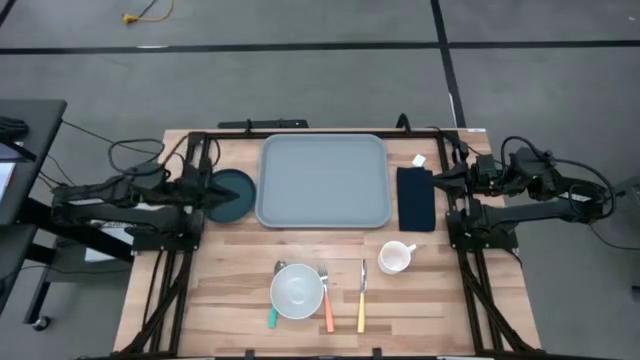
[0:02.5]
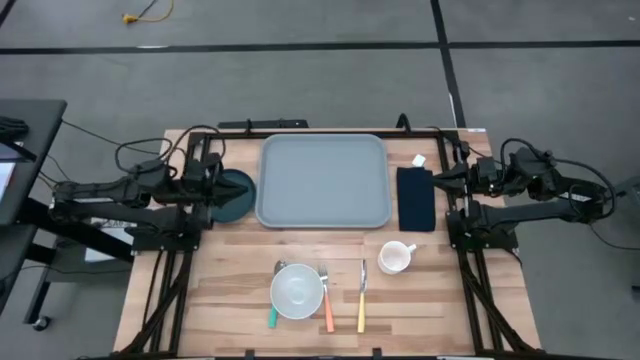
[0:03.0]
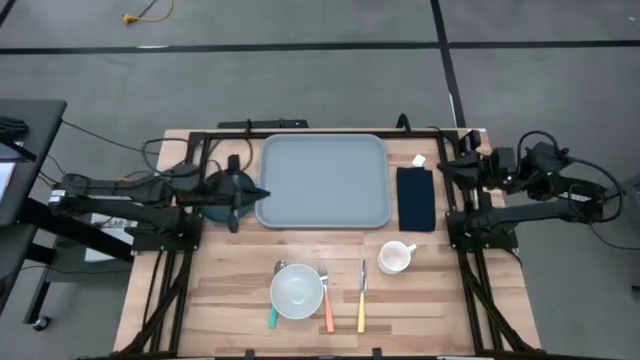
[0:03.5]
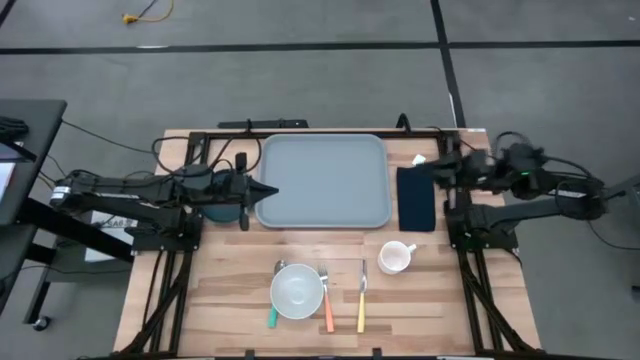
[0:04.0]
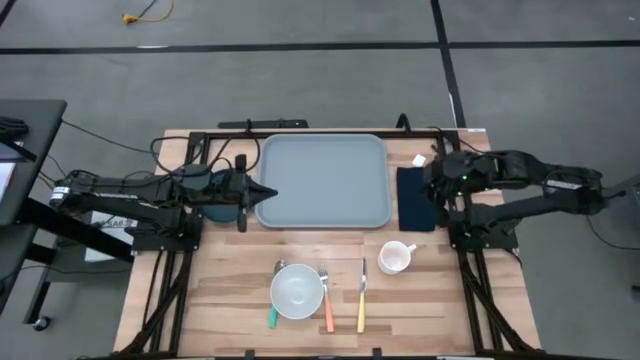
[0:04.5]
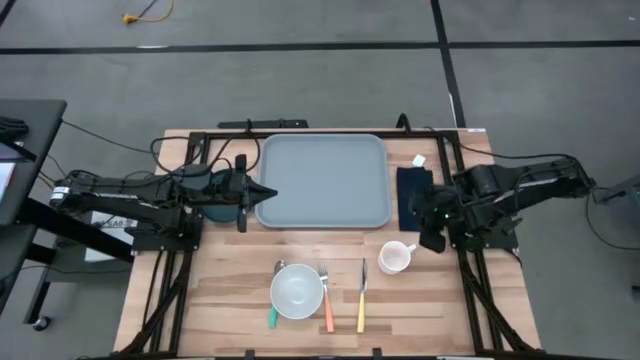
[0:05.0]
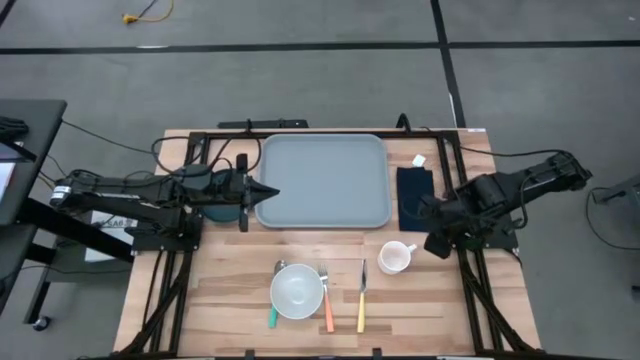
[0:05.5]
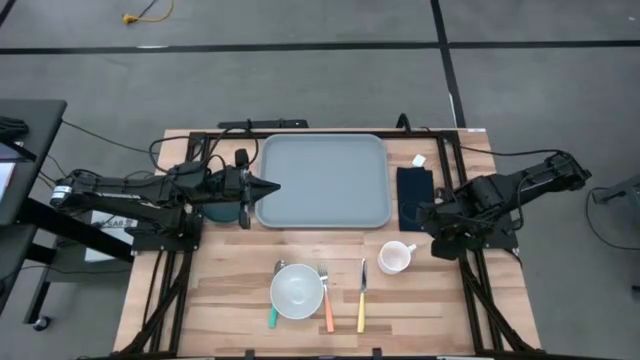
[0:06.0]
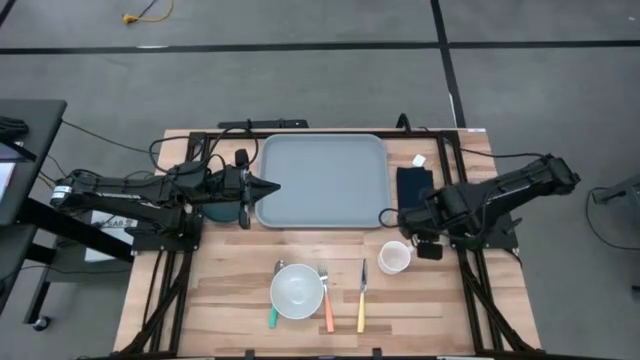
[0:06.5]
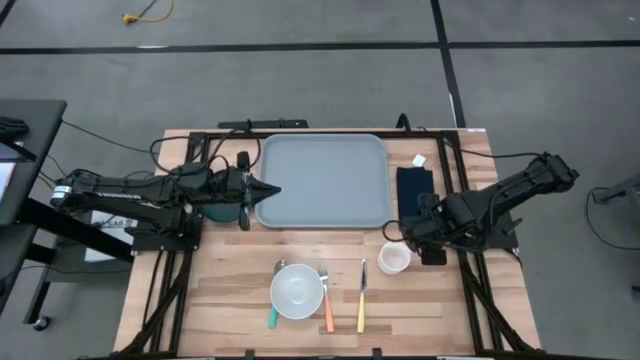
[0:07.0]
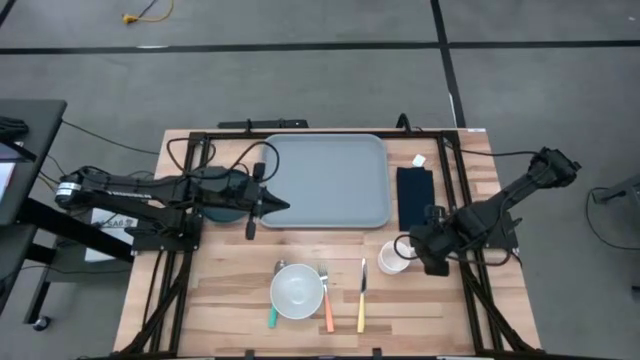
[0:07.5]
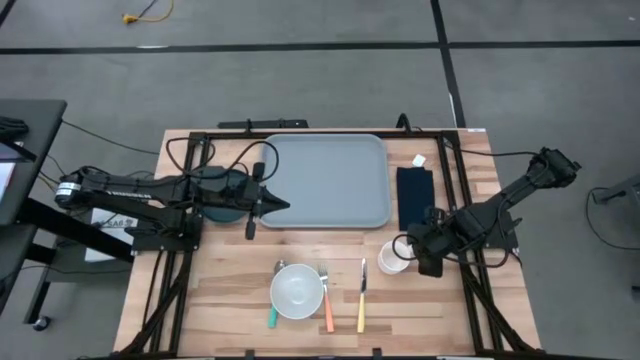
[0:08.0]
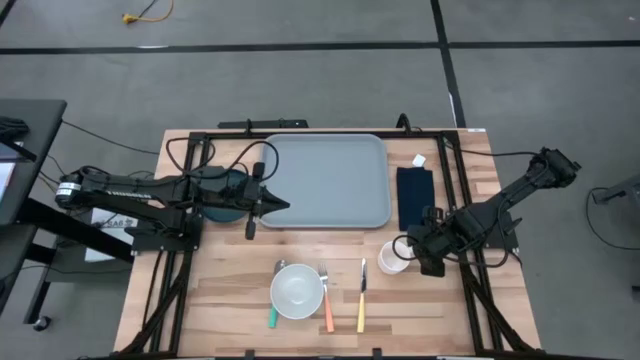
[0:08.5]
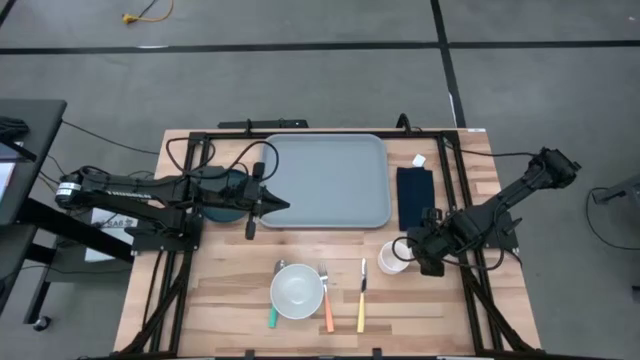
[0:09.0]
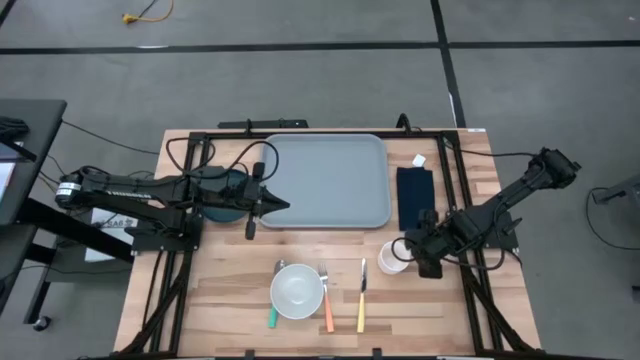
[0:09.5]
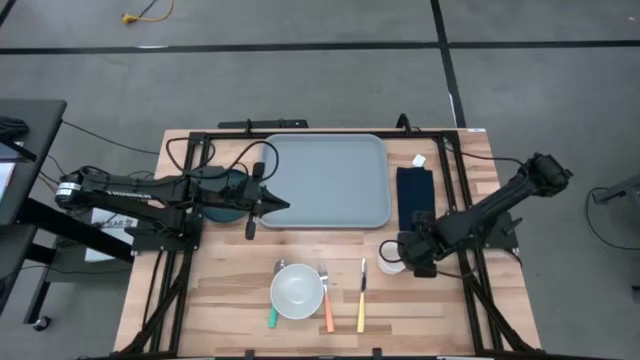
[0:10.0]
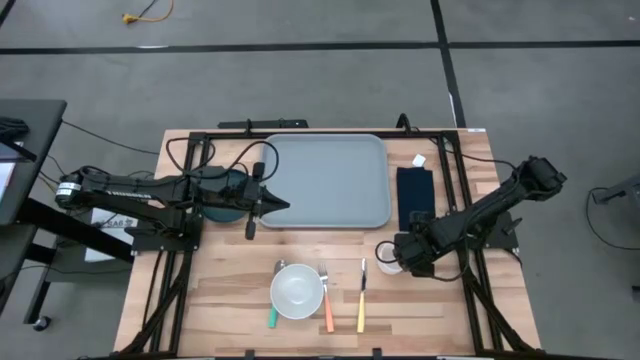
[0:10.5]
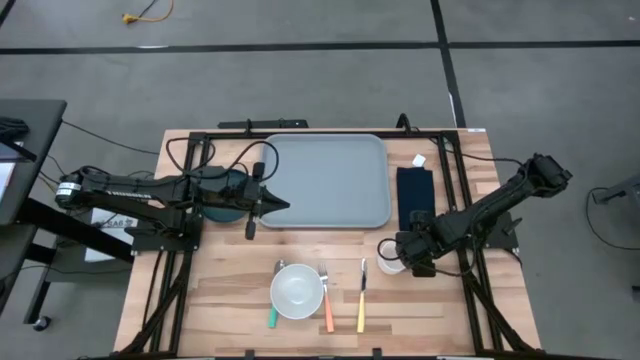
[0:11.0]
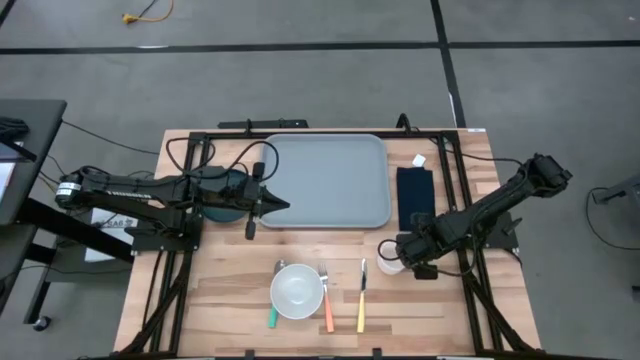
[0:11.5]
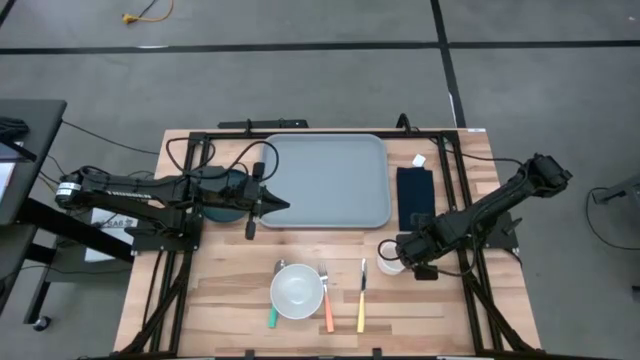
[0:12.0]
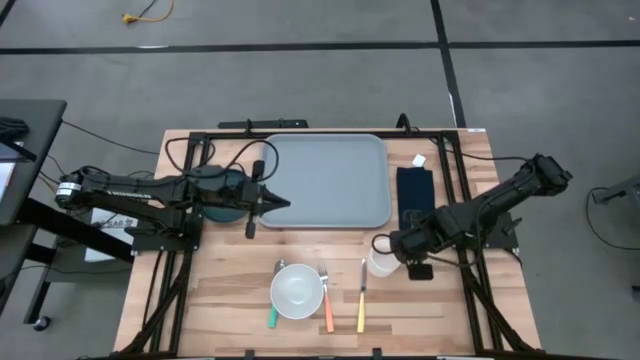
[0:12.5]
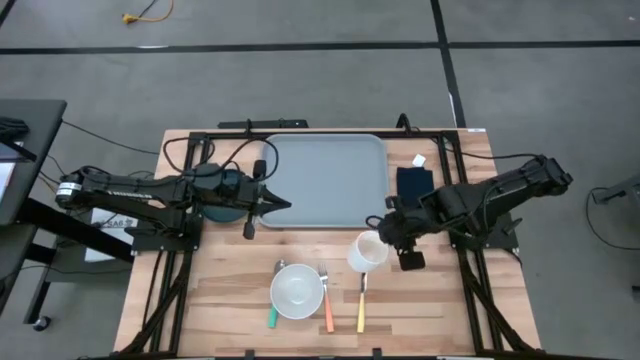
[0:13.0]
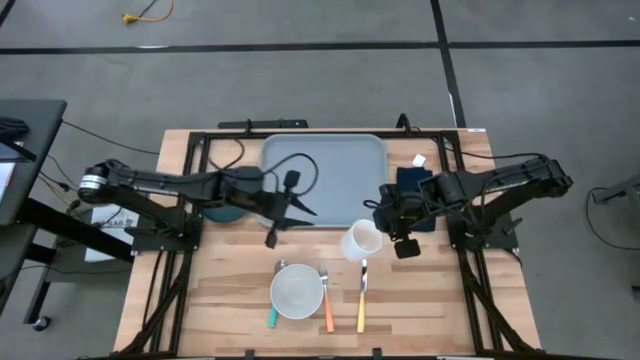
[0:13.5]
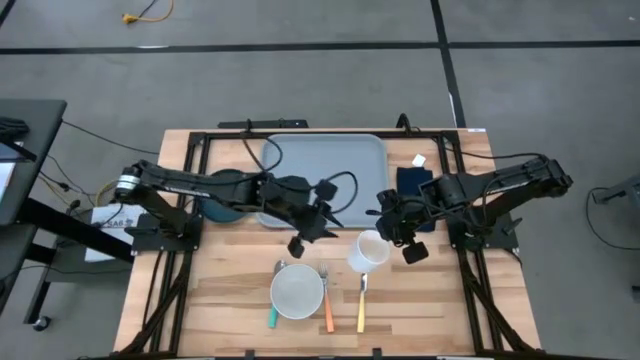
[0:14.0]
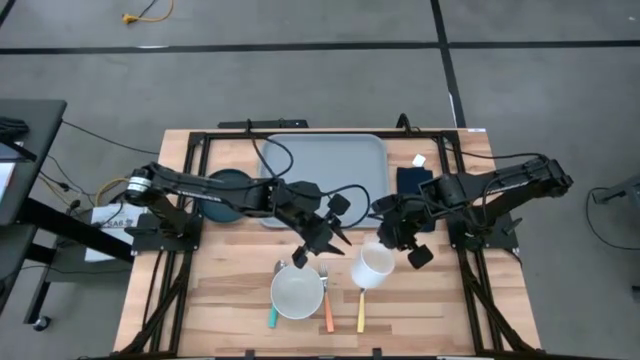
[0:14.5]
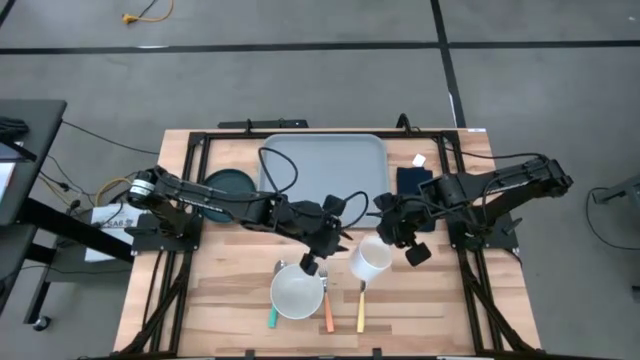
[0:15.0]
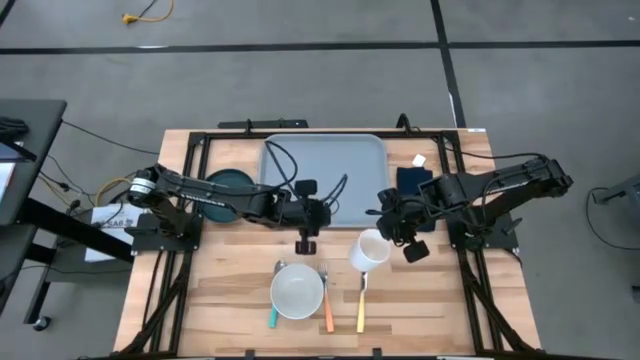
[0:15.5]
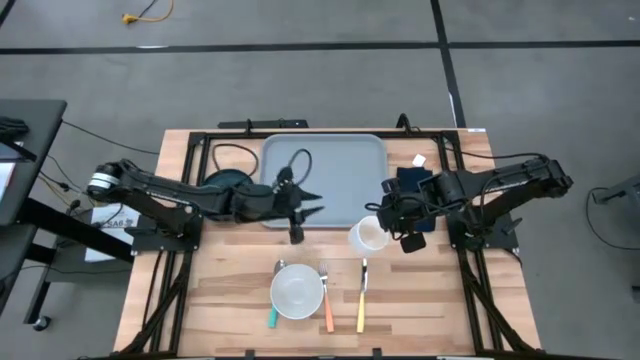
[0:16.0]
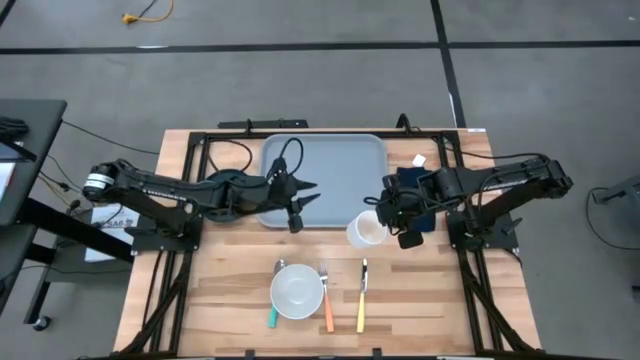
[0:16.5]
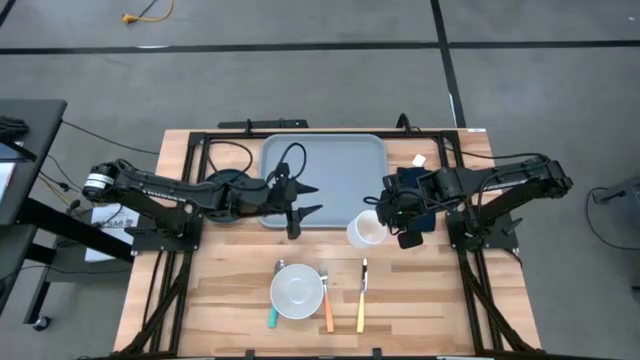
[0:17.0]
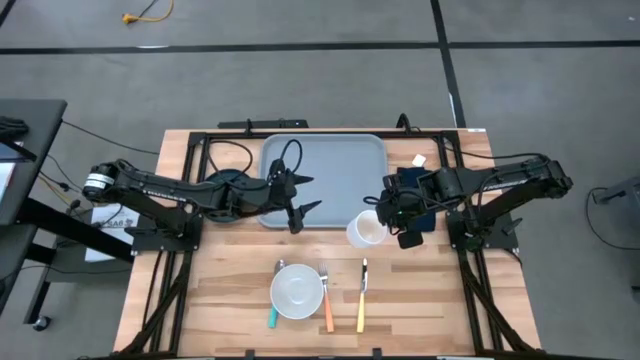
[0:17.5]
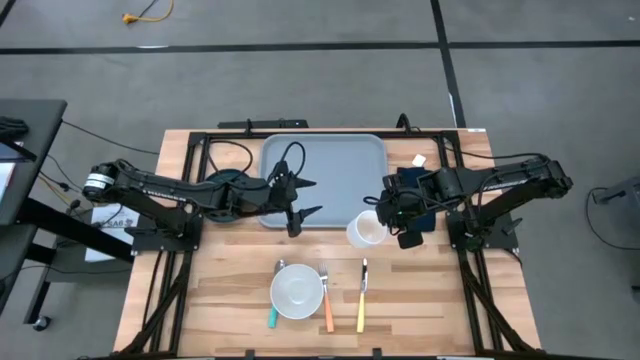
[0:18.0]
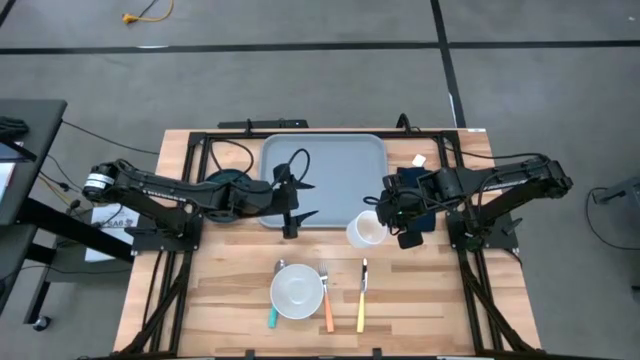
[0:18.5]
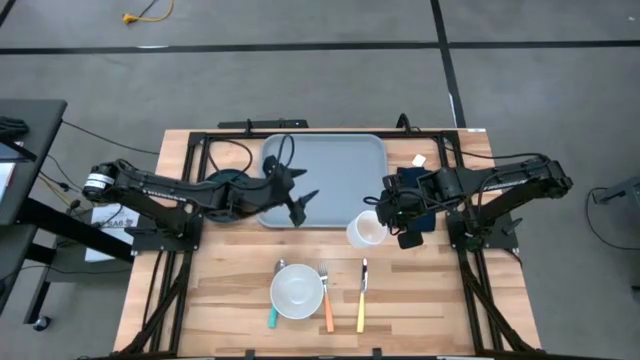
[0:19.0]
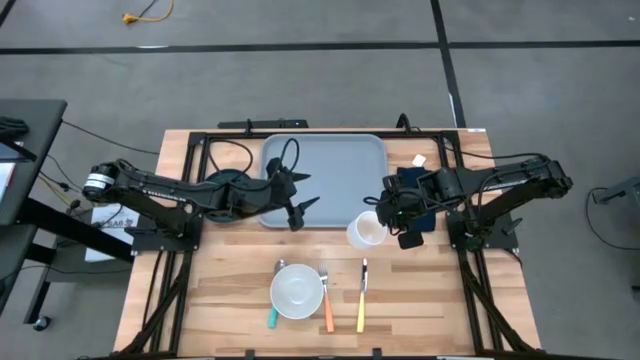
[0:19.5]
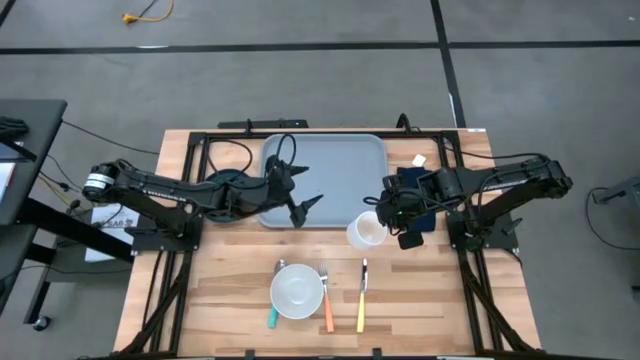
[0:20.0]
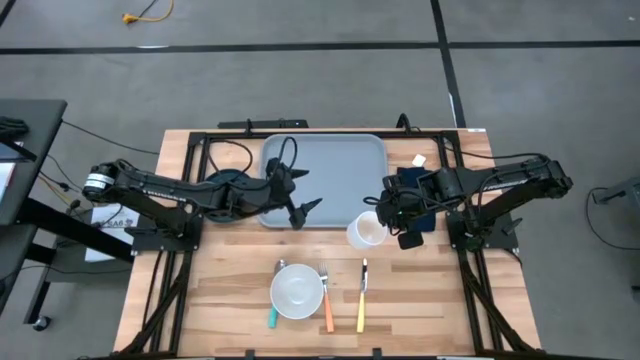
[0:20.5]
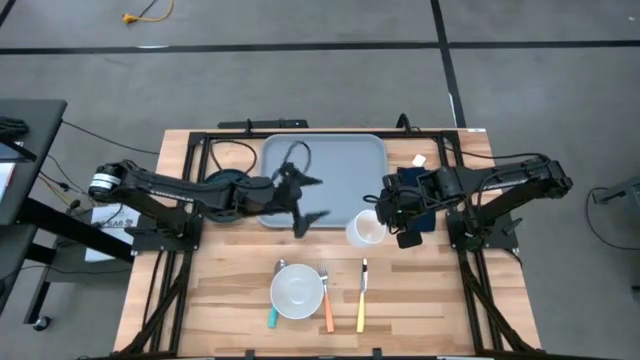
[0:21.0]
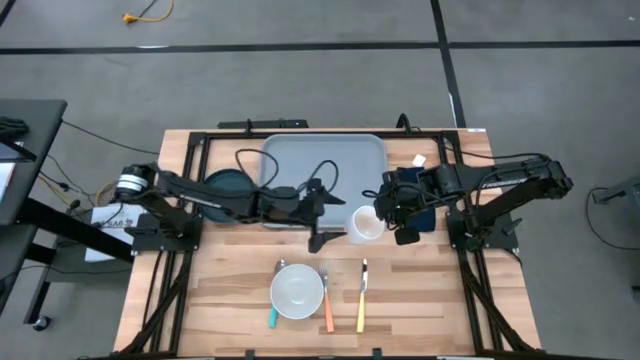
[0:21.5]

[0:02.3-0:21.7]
Task: Set up tray
Put the white mug on the gray serving tray
